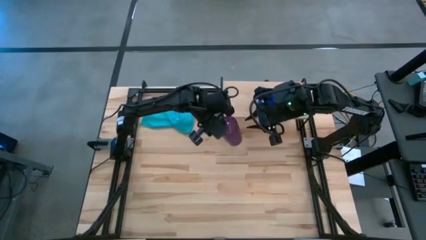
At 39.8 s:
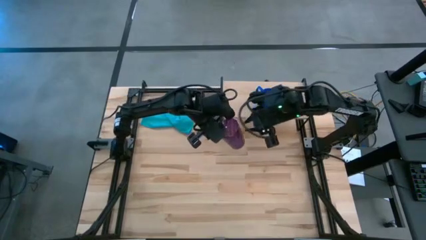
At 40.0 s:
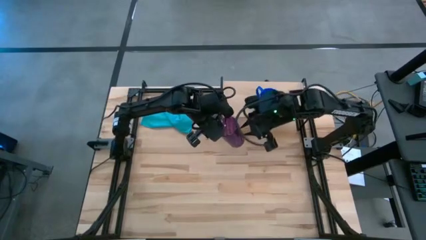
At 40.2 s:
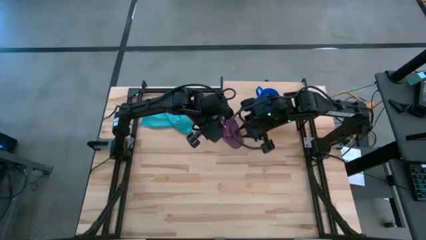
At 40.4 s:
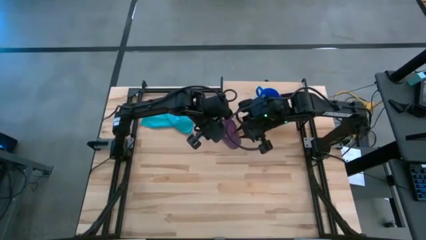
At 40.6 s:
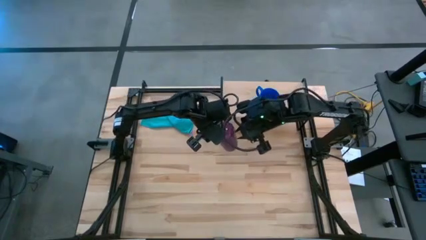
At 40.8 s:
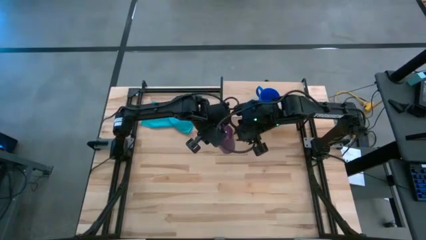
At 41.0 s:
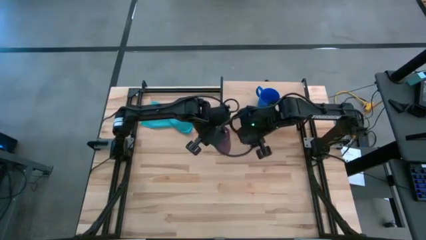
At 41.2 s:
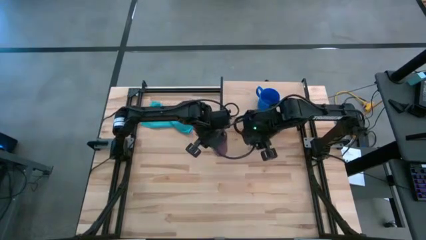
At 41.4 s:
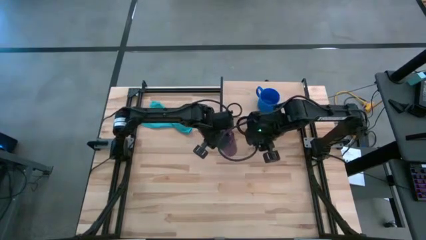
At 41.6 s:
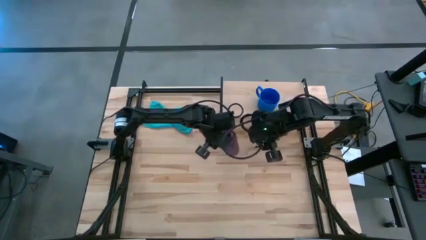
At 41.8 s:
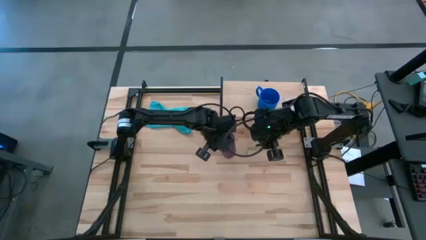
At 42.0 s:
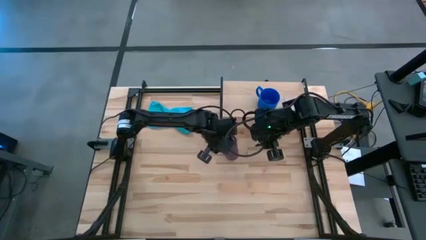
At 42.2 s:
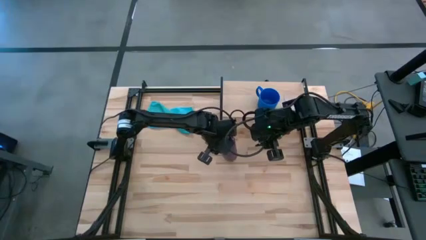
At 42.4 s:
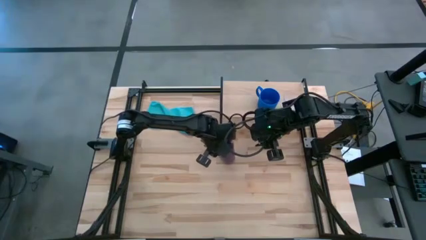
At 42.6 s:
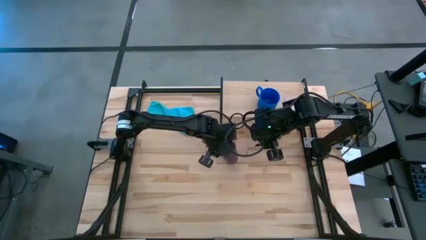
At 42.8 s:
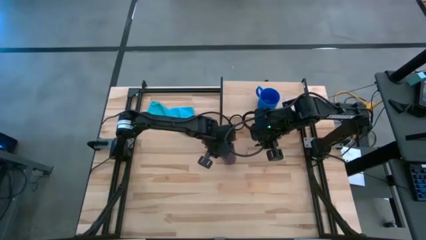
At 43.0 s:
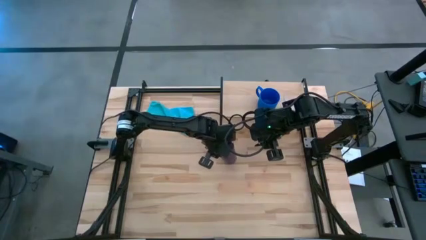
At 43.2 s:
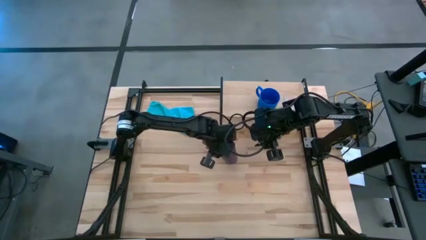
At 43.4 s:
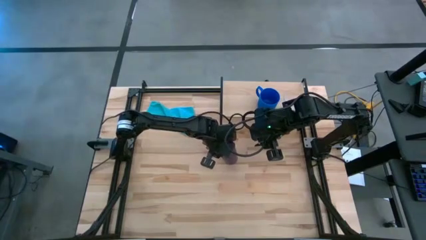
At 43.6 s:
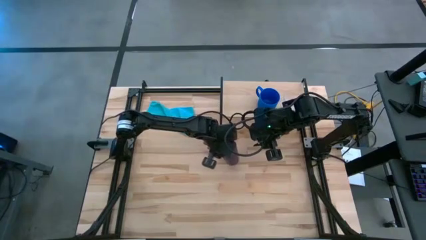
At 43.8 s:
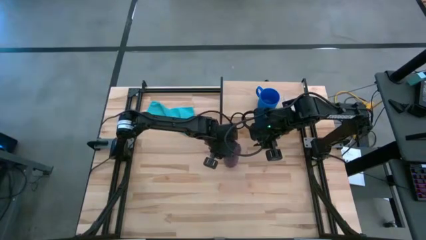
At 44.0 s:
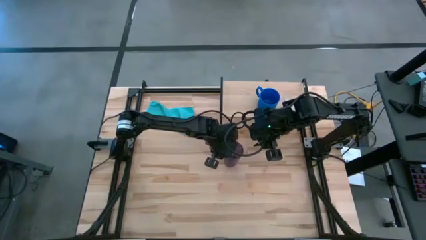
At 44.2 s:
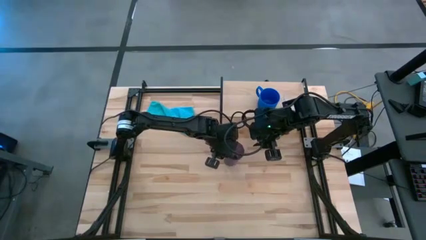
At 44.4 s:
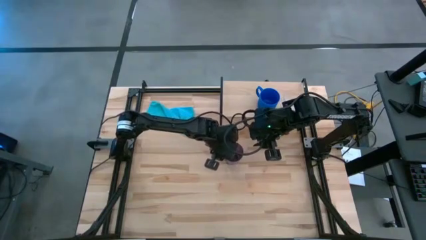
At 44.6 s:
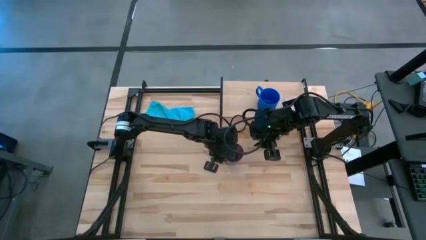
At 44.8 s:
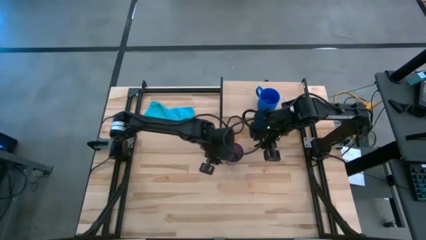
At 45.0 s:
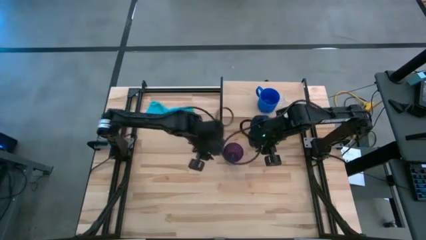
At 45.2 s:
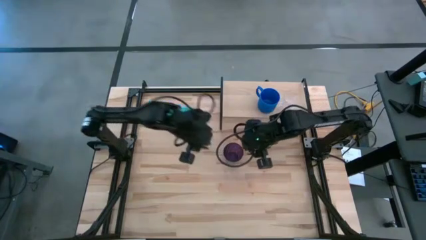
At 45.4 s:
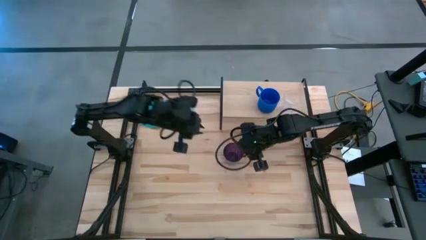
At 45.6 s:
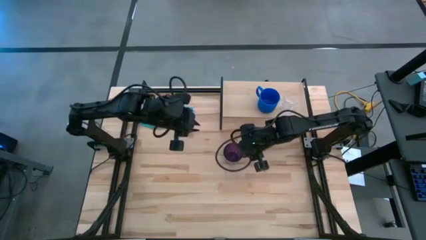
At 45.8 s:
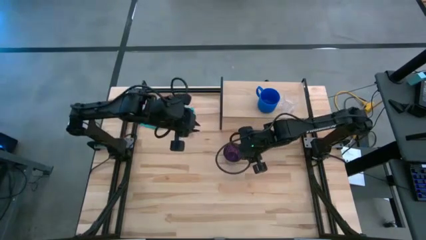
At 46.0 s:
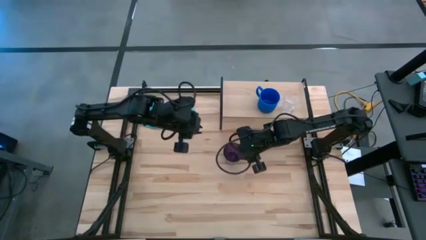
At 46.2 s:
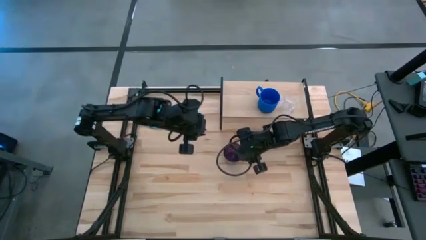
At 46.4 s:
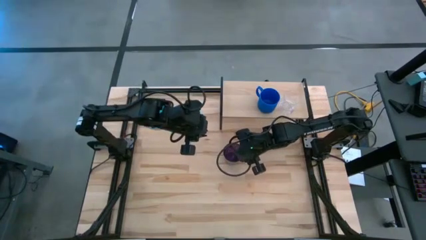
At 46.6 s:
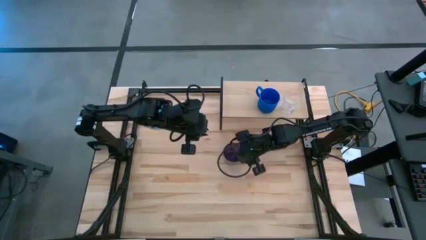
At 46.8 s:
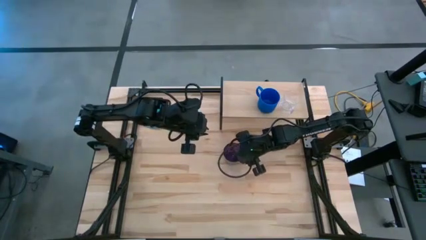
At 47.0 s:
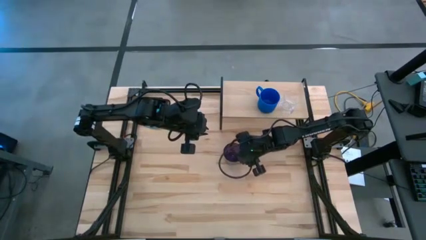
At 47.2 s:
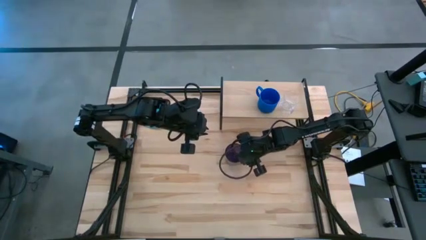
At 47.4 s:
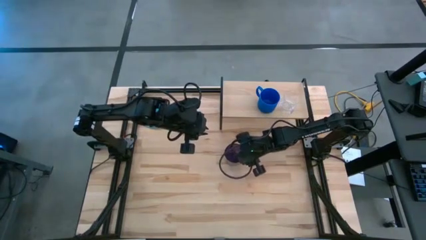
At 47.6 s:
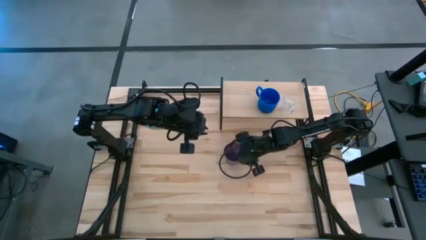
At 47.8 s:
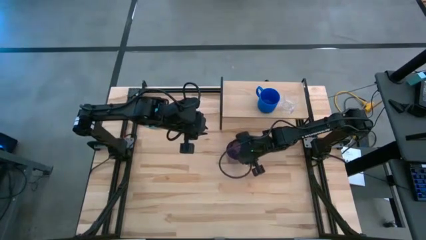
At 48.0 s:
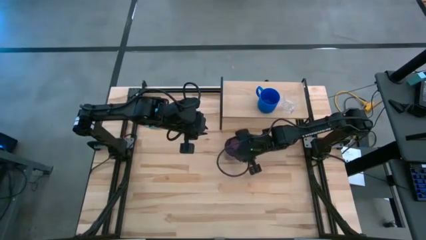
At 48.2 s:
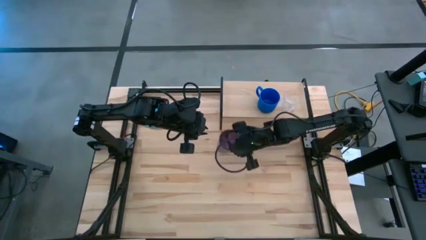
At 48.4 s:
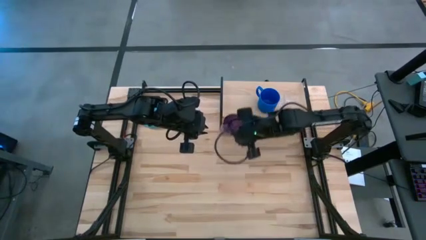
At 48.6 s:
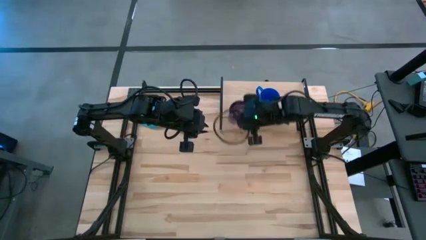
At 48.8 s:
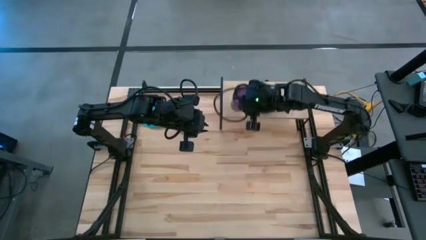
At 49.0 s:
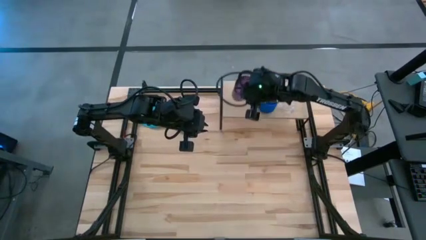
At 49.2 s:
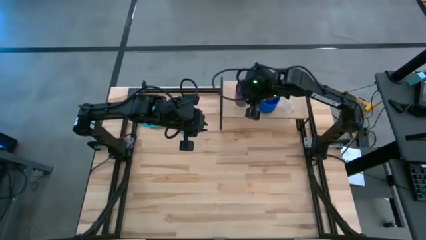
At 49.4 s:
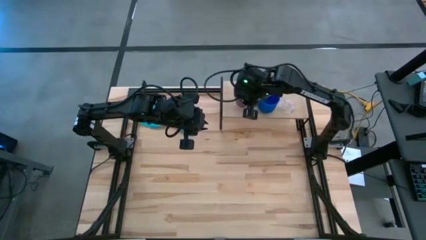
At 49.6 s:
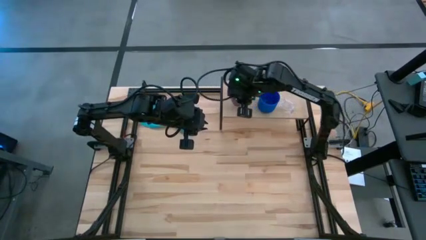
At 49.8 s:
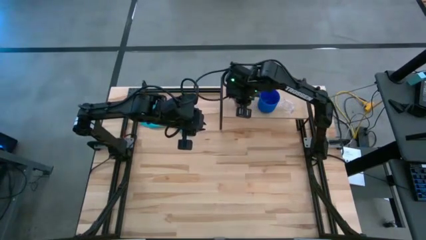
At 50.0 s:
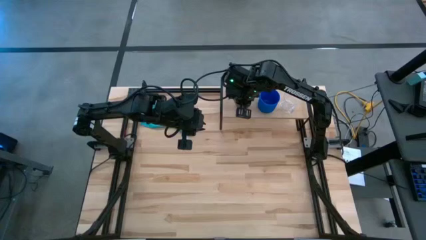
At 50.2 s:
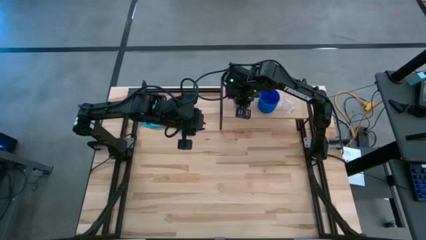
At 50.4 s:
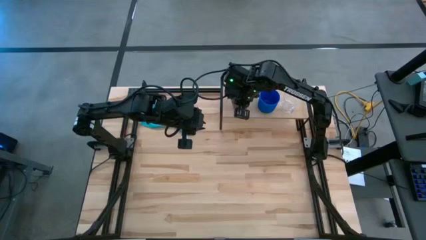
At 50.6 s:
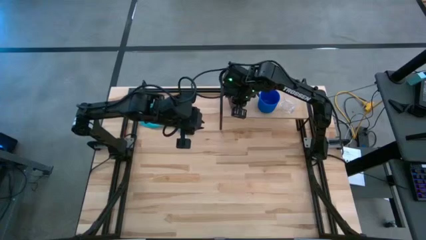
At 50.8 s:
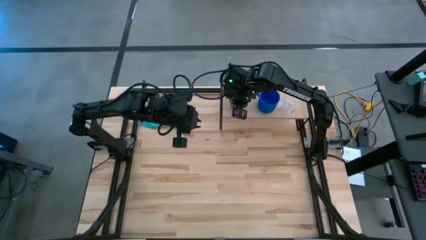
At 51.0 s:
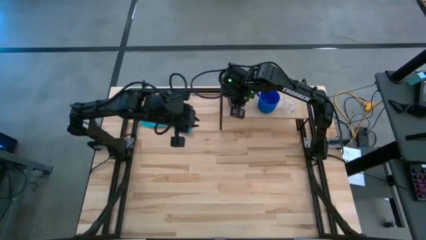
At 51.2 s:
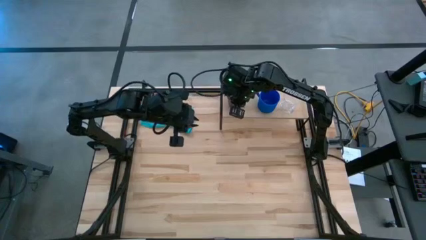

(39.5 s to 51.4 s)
Task: Stack small to large cups/mugs on shelf
Put the purple cup into the shelf

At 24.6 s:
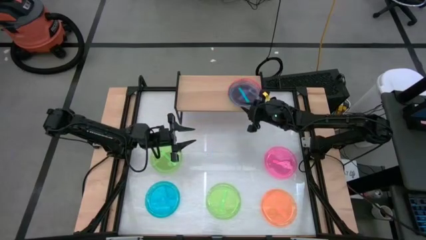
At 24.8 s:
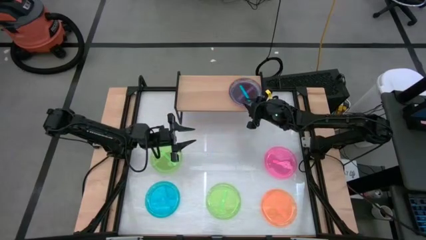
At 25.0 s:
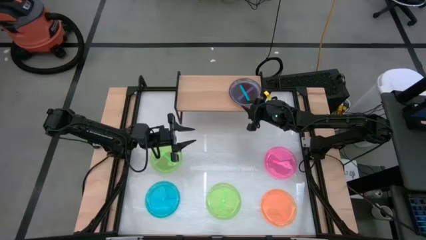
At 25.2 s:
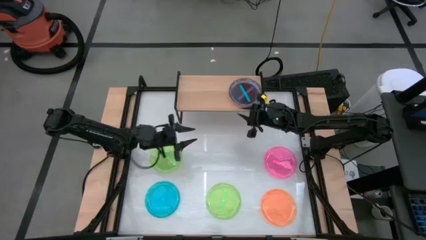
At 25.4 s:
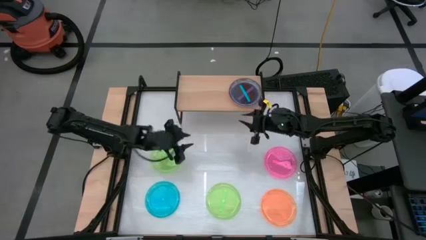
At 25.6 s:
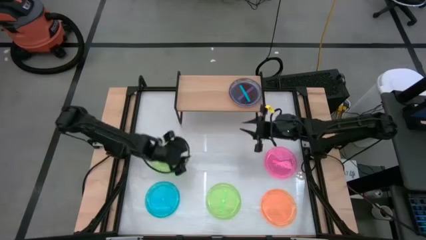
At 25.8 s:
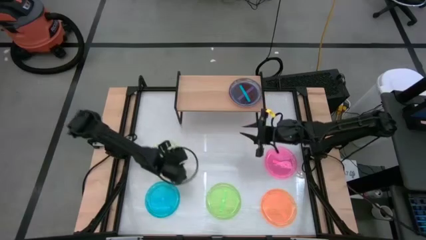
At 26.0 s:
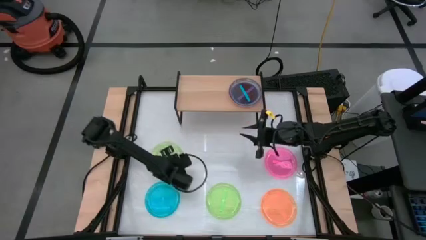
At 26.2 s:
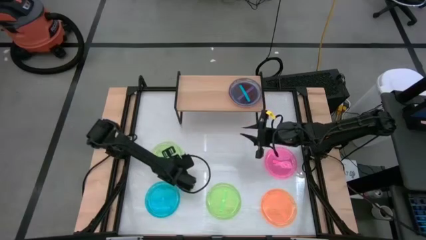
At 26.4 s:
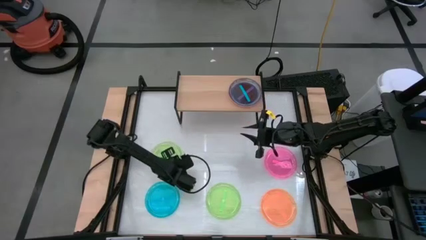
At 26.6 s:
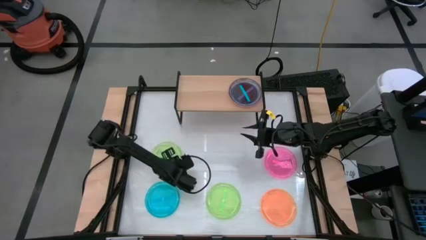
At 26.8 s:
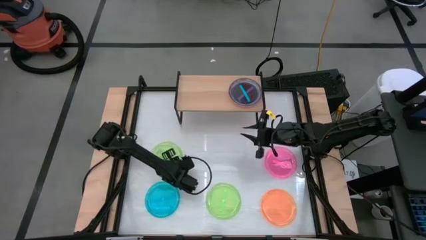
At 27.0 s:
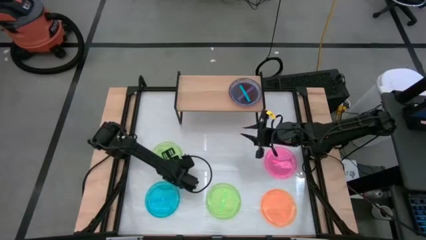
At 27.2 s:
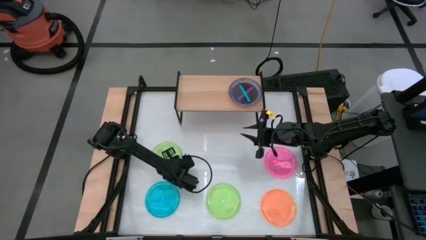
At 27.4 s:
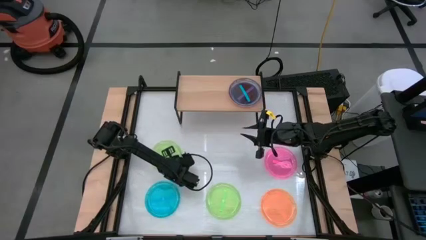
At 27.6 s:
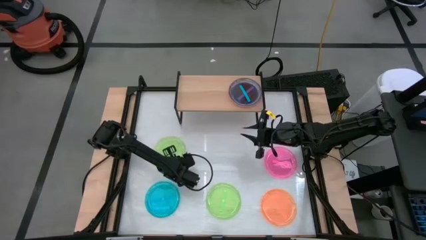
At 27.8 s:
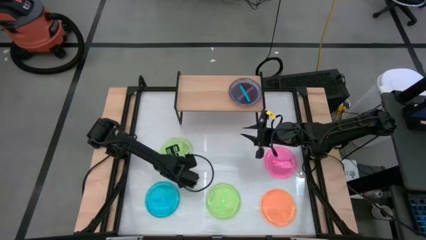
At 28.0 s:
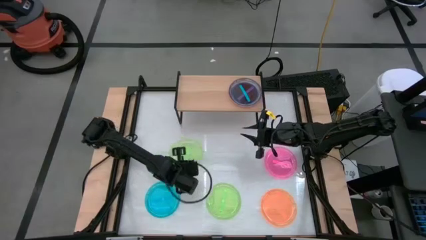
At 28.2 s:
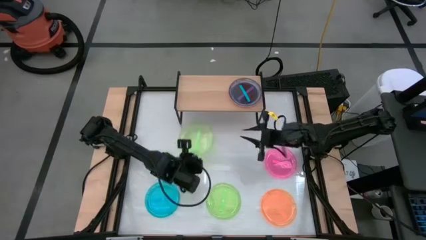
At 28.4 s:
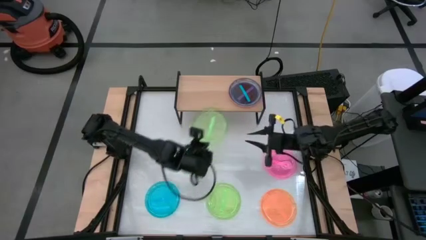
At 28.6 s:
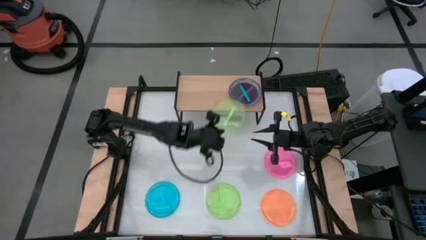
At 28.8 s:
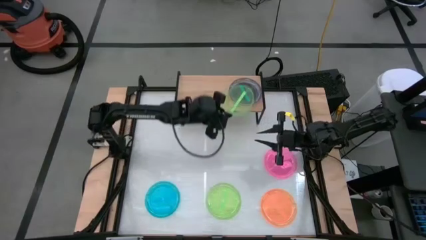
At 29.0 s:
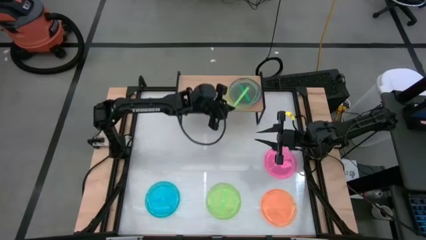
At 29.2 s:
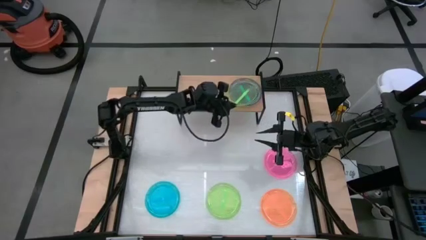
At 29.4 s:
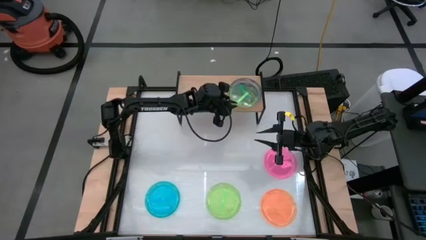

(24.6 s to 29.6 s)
Task: Place and stack plates onto a shelf
Stack the top green plate on top of the blue plate on the shelf
